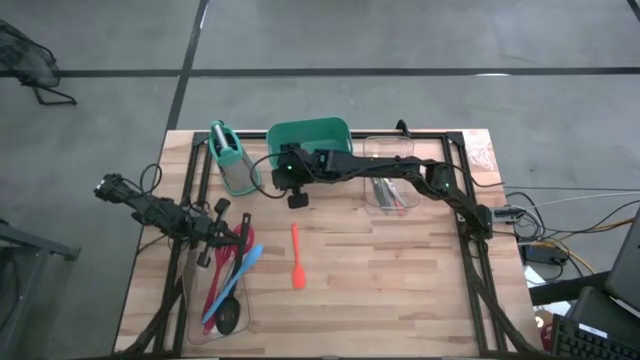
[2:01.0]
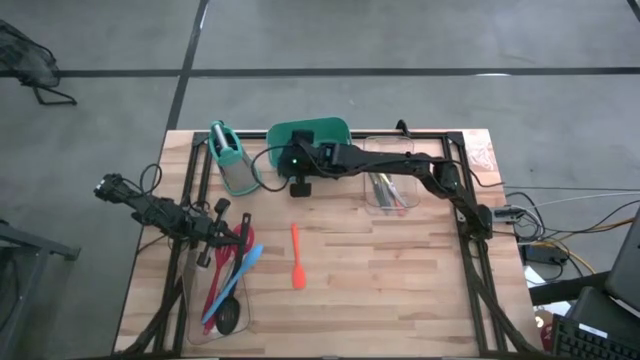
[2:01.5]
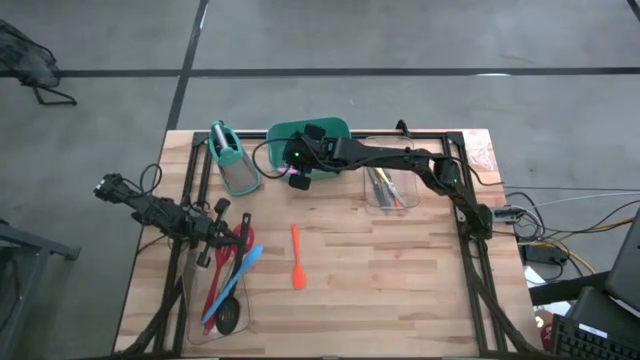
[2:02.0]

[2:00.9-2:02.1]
Task: Pick & Place Kitchen Items
Put the pink spatula into the green bin

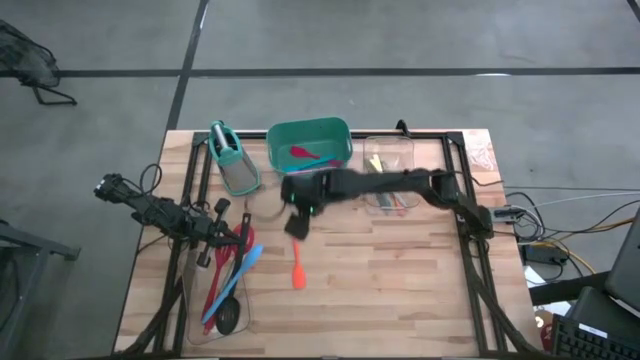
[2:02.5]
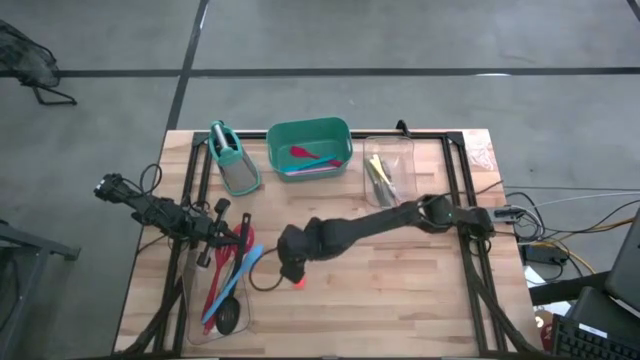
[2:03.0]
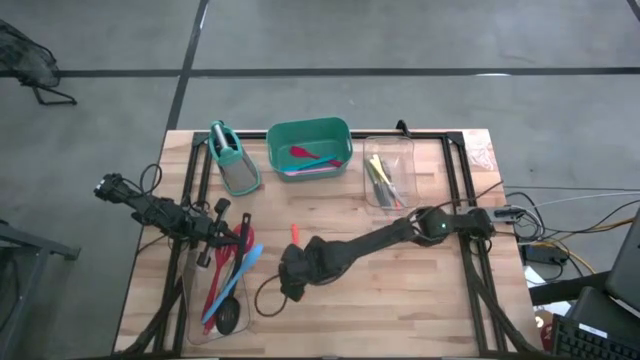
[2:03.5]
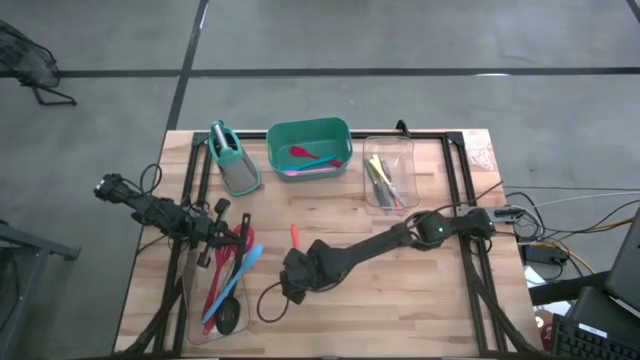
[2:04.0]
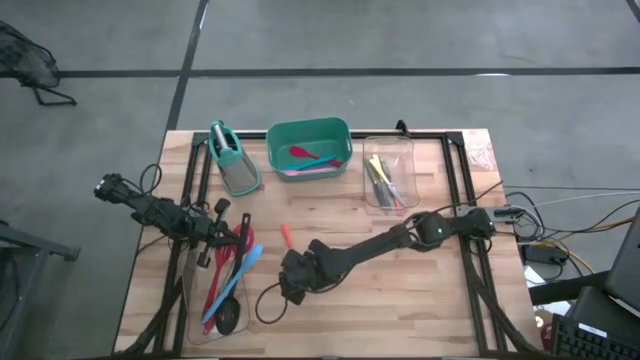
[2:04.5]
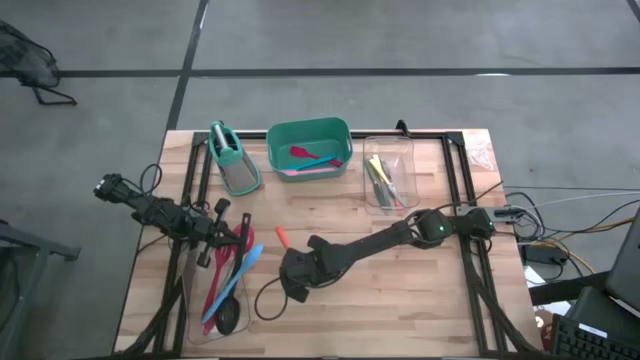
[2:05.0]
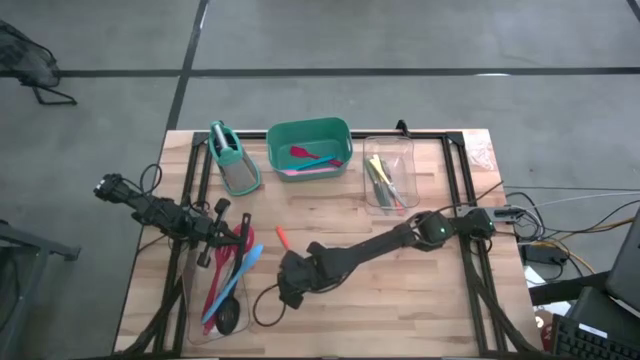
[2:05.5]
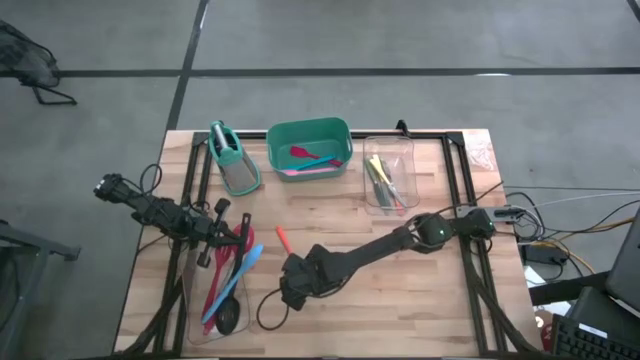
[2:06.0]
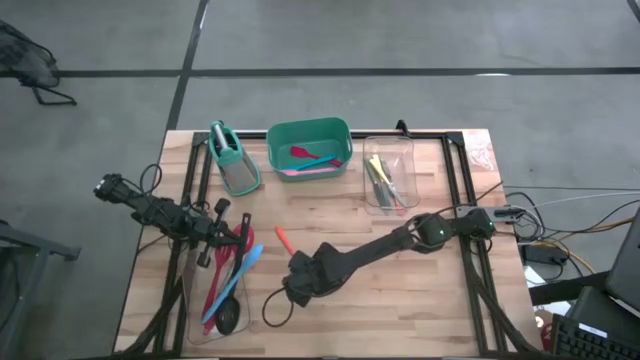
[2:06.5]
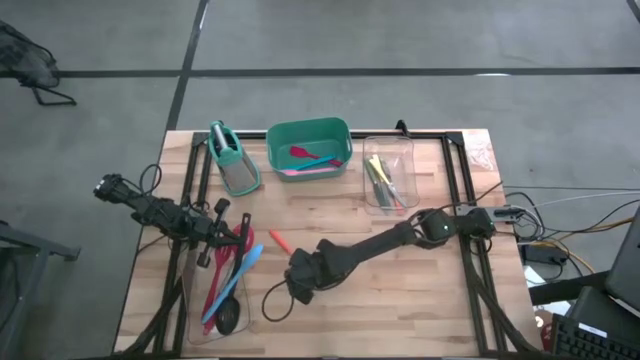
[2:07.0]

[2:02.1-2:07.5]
Put the orange spatula into the green bin

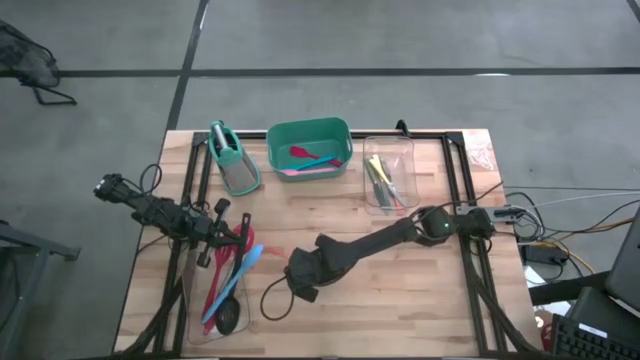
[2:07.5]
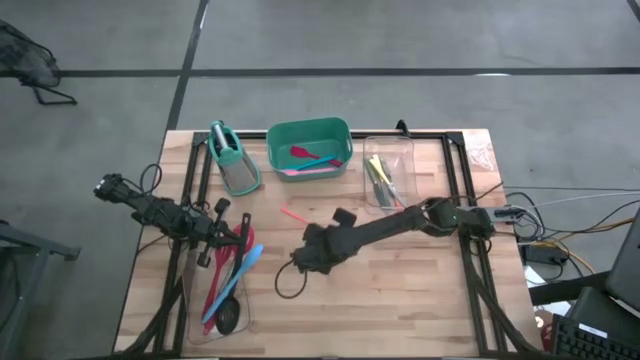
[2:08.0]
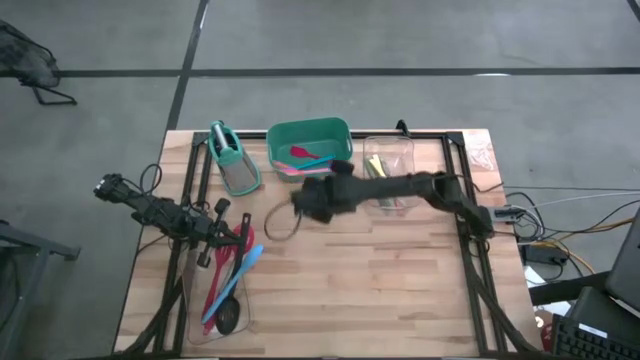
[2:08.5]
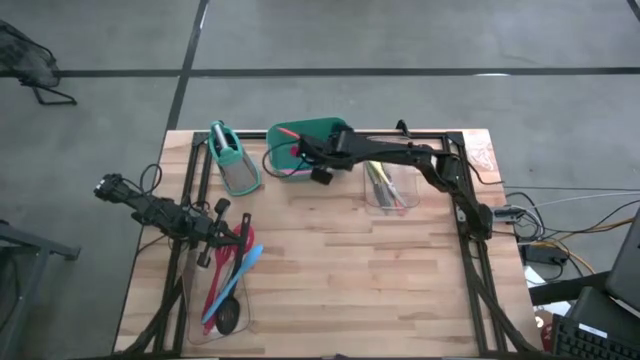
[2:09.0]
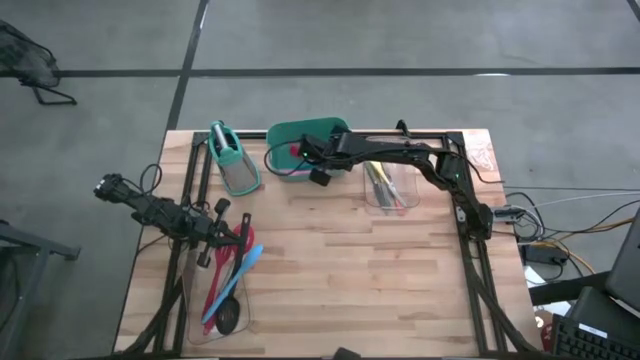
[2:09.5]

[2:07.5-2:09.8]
Put the orange spatula into the green bin

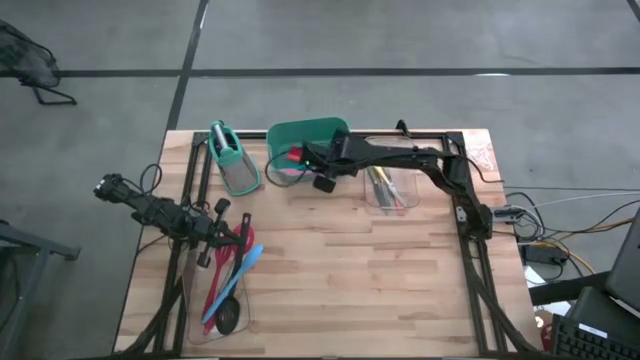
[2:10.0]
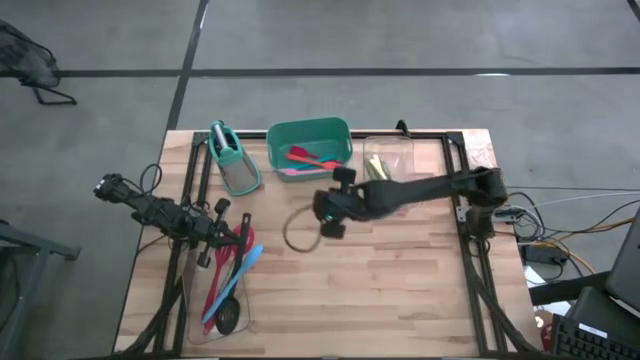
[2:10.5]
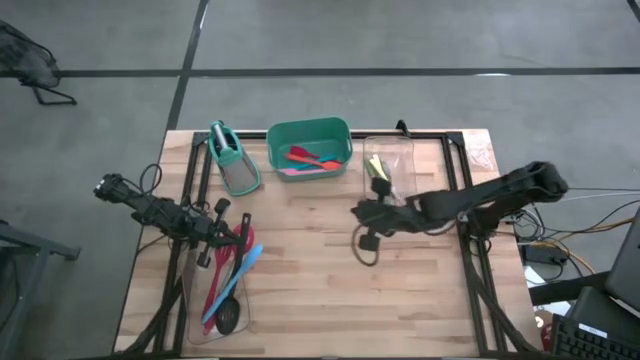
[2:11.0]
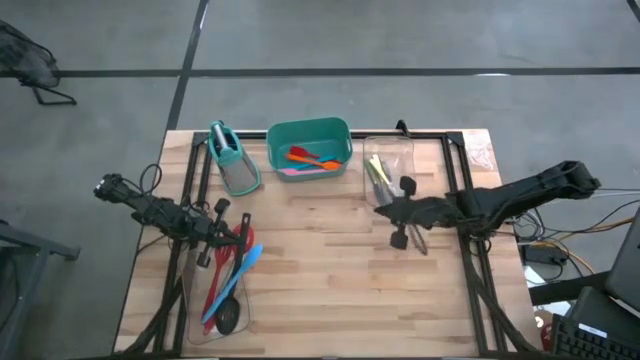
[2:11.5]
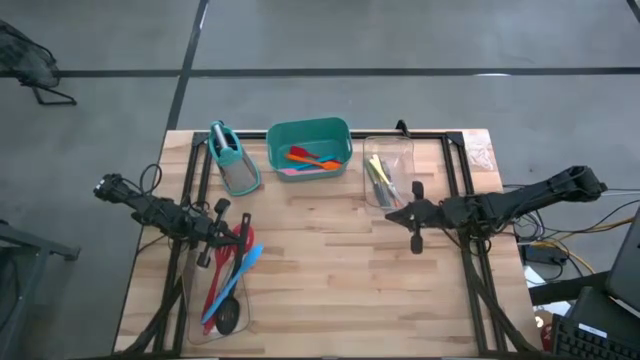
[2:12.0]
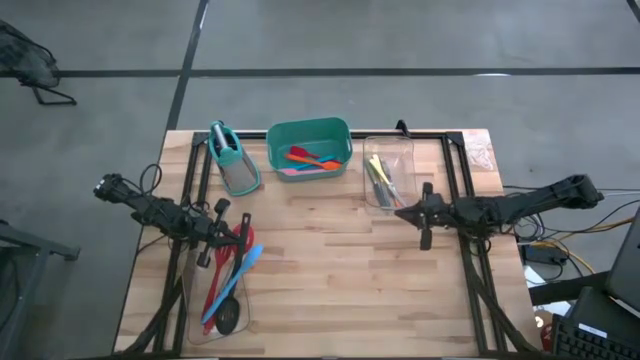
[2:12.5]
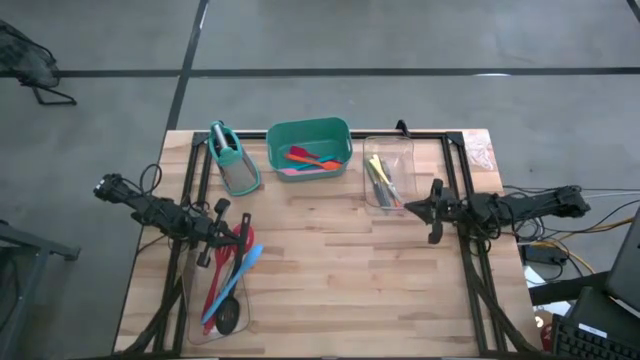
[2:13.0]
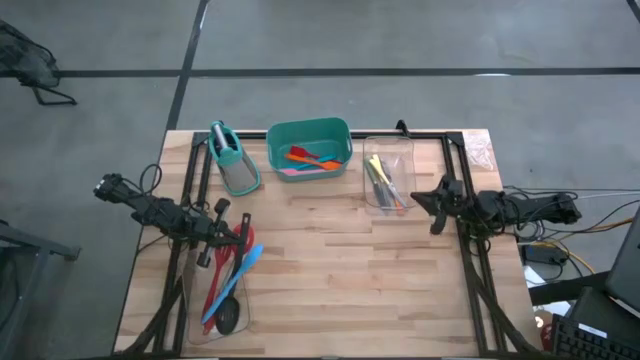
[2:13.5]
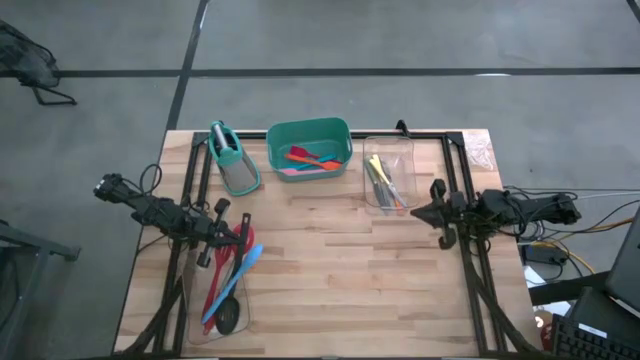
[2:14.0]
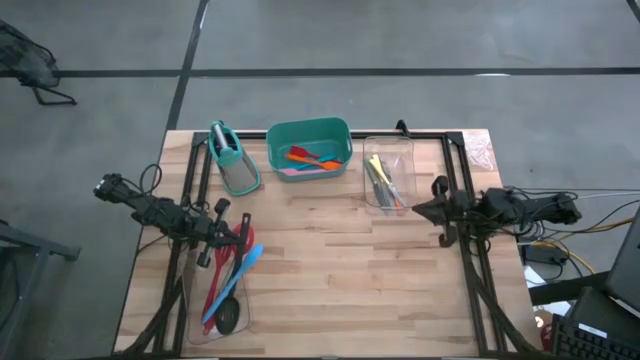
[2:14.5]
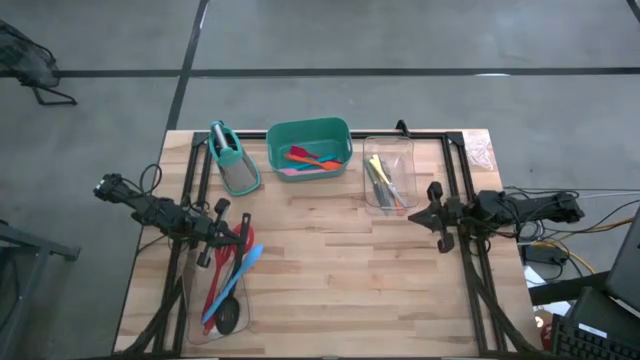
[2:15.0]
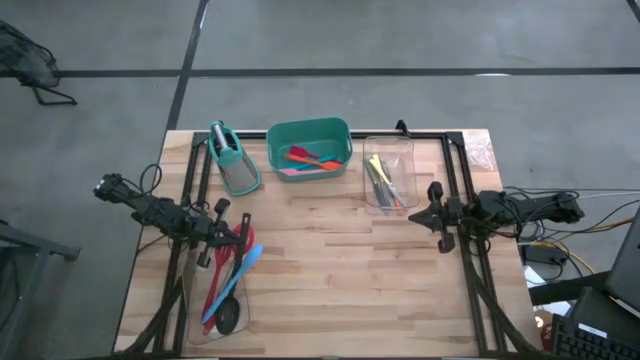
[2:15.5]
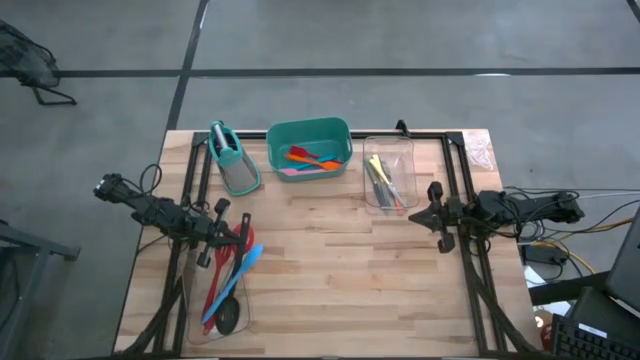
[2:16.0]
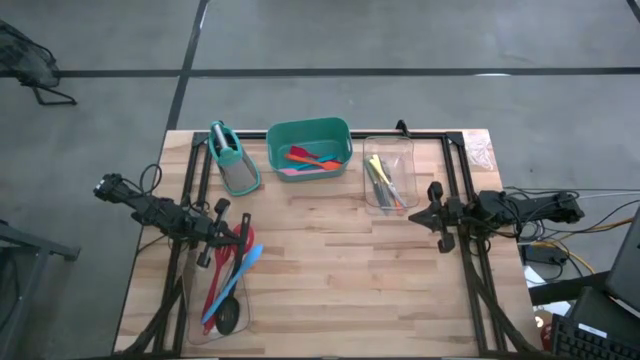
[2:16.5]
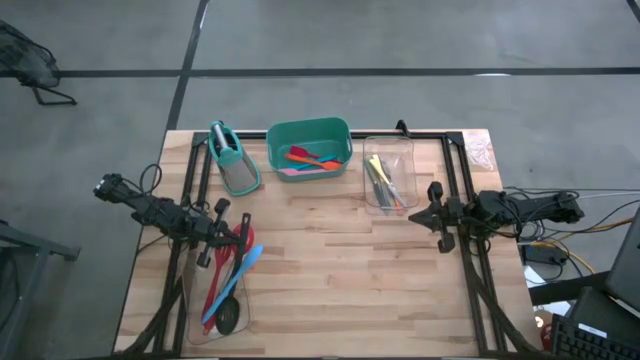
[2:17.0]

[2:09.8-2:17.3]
Return to Home Position

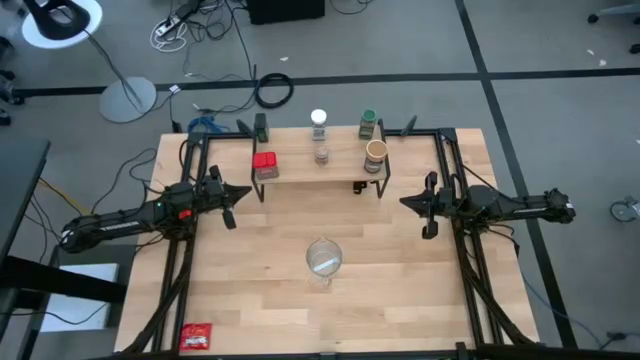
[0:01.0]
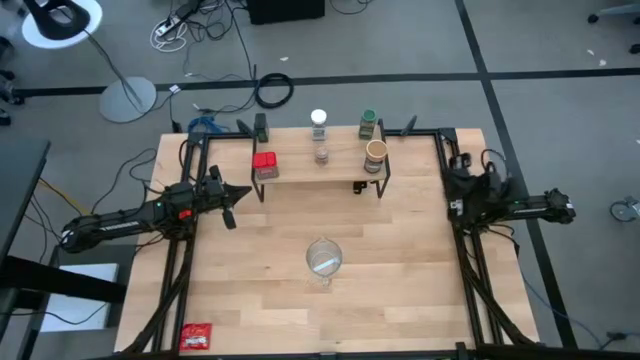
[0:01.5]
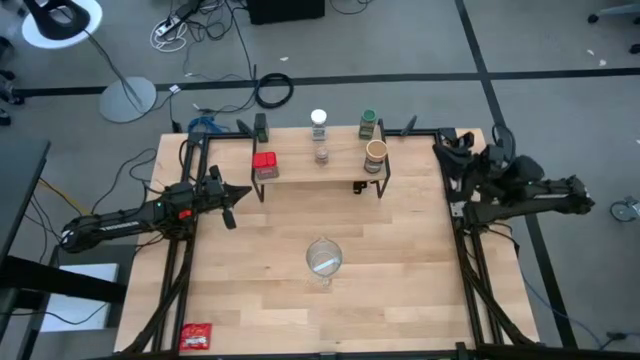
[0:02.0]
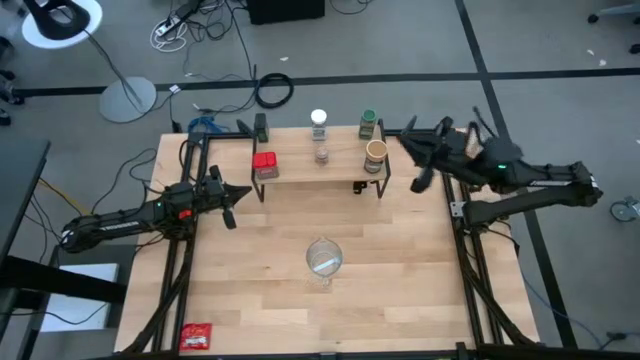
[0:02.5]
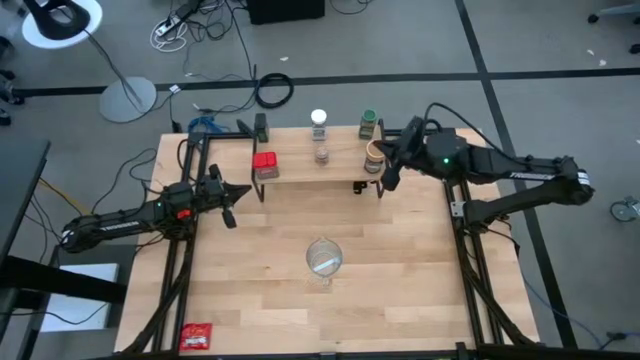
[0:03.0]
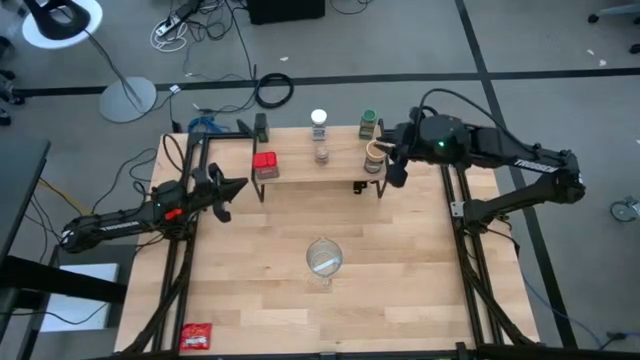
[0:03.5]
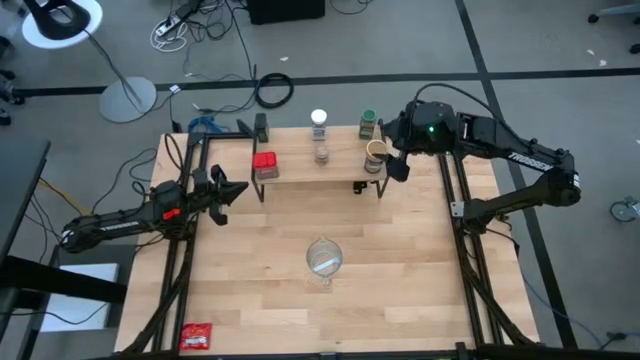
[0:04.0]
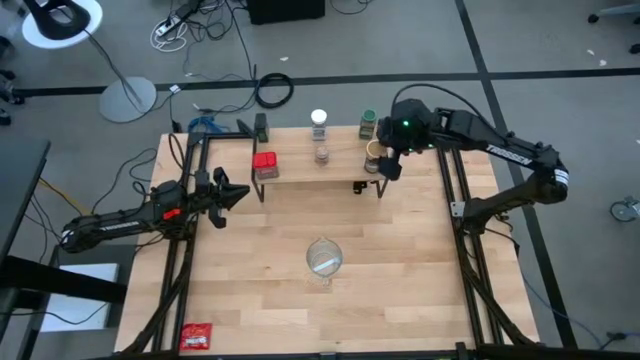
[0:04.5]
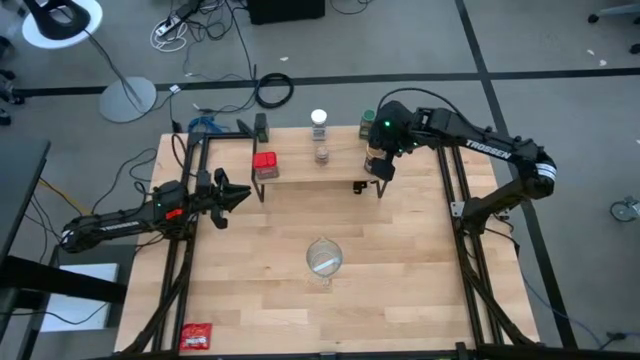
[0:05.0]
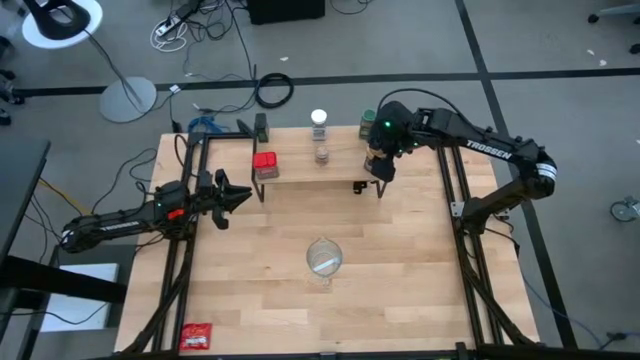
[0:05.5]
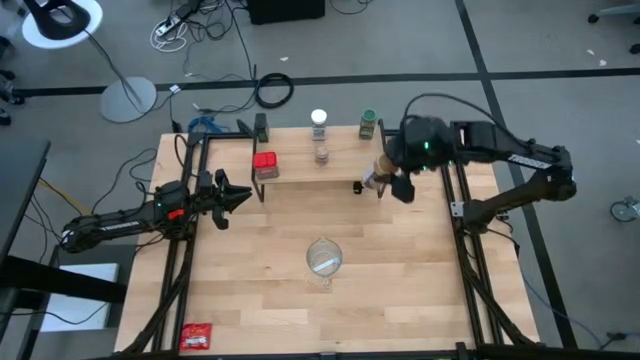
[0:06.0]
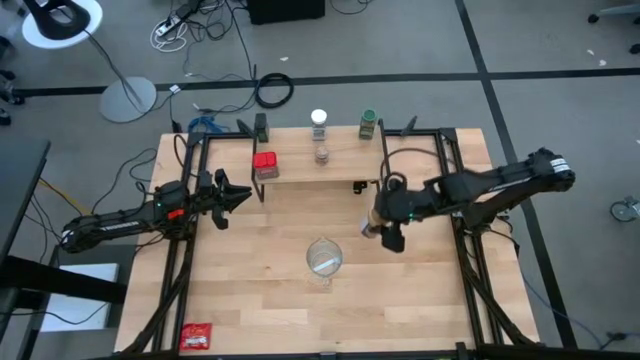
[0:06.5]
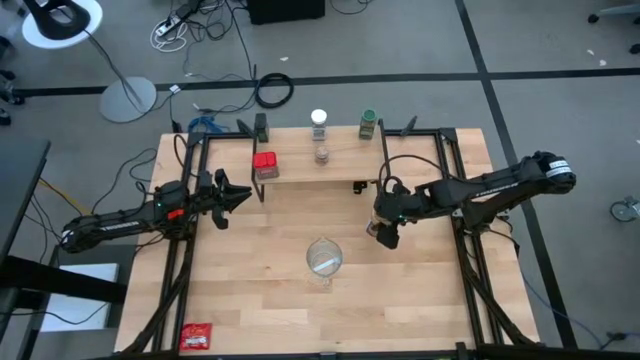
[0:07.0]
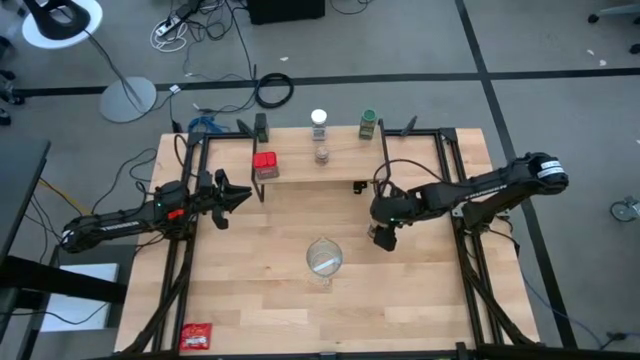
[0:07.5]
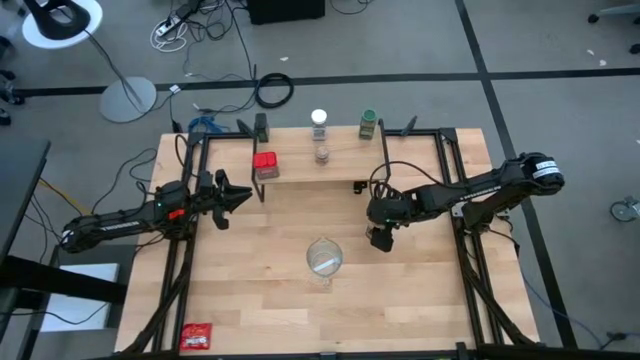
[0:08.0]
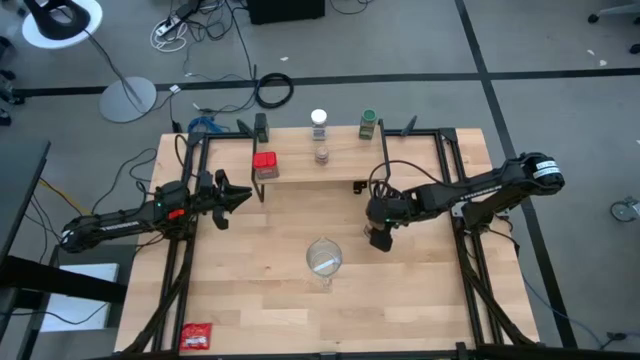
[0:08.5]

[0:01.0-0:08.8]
Task: Shelf spices
Remove the golden seasoning bottle from the shelf
